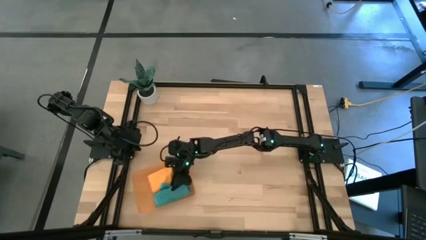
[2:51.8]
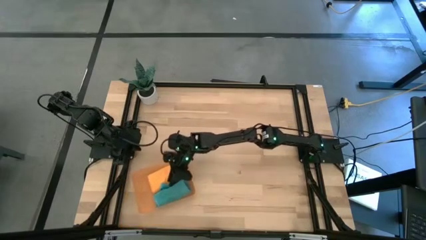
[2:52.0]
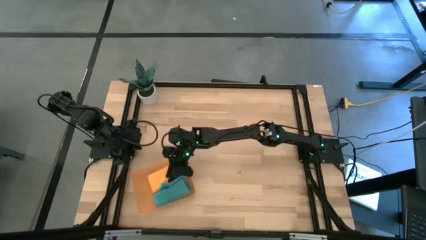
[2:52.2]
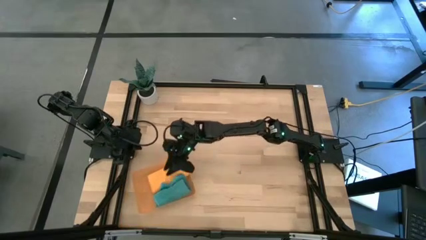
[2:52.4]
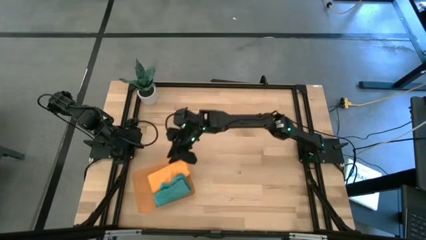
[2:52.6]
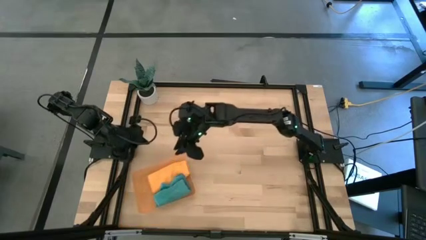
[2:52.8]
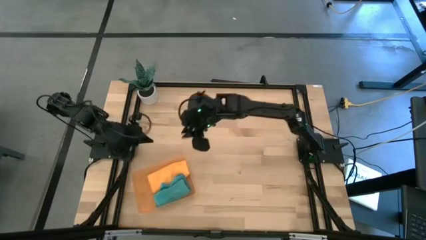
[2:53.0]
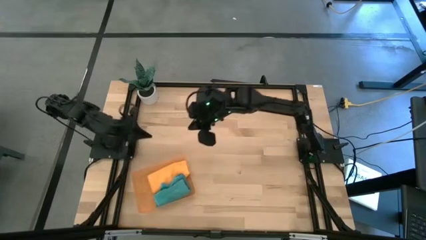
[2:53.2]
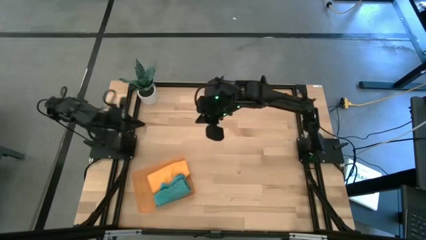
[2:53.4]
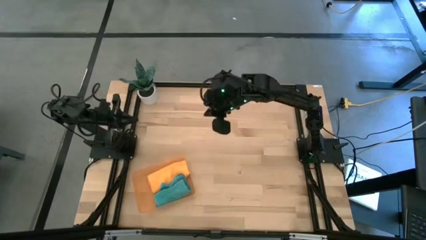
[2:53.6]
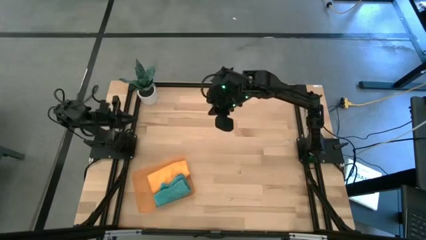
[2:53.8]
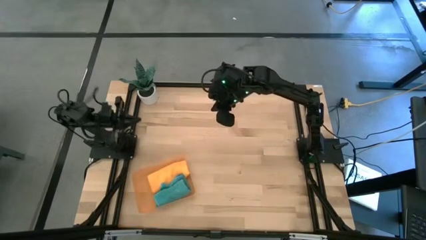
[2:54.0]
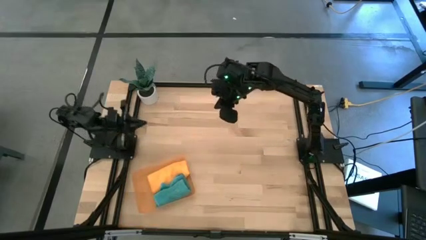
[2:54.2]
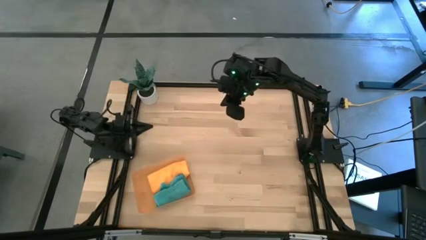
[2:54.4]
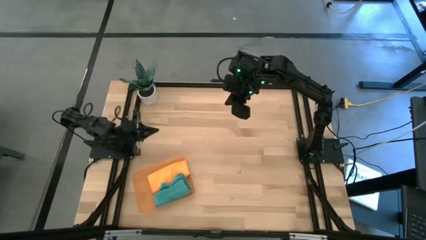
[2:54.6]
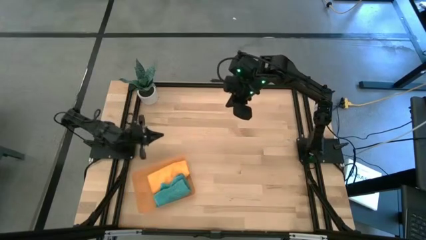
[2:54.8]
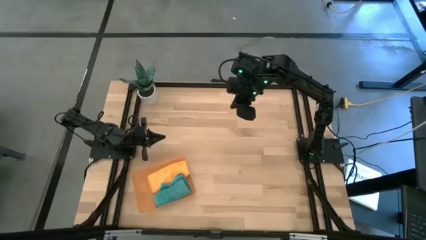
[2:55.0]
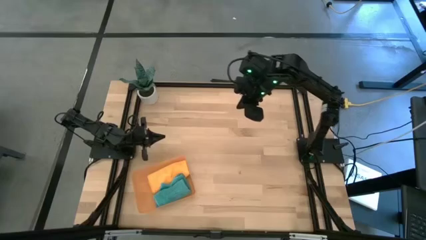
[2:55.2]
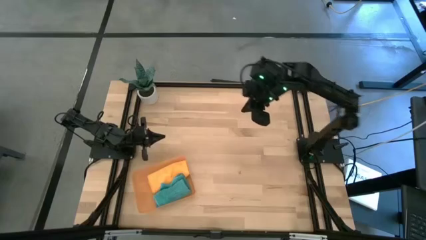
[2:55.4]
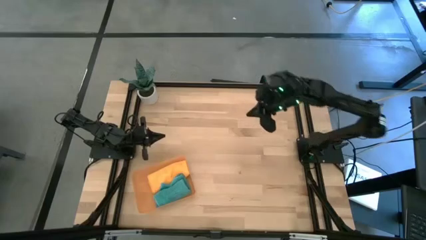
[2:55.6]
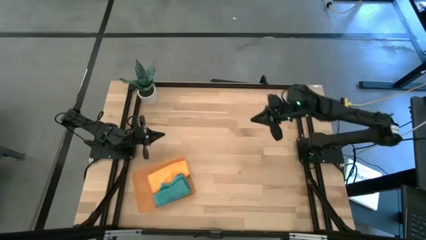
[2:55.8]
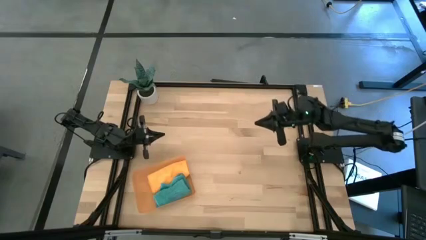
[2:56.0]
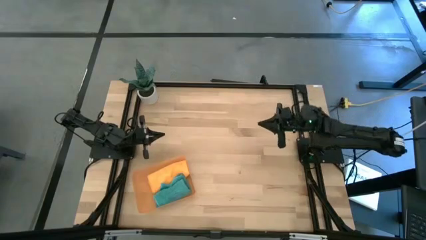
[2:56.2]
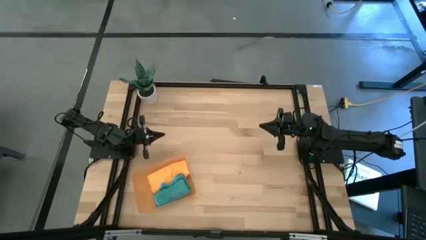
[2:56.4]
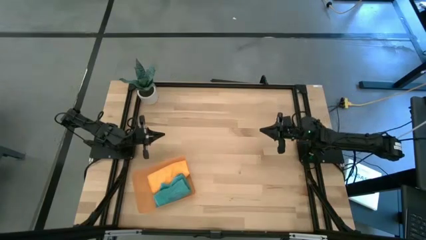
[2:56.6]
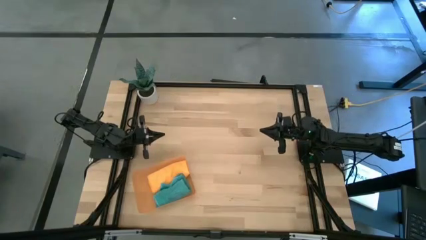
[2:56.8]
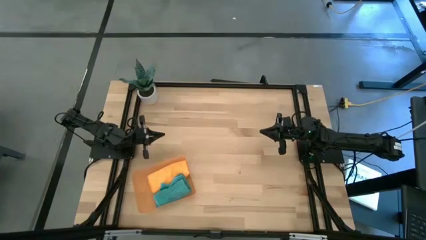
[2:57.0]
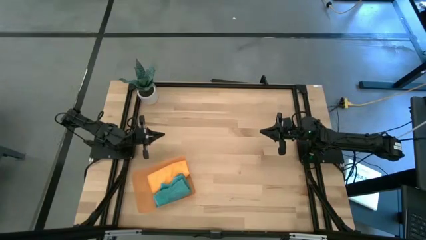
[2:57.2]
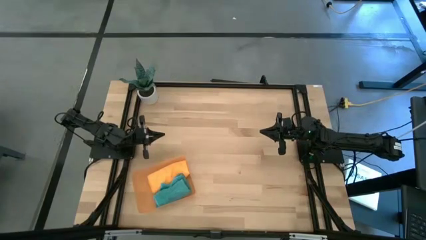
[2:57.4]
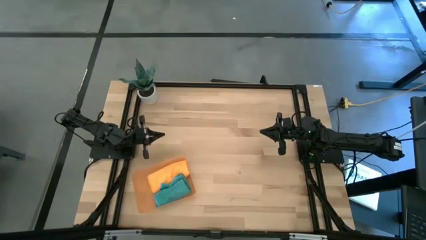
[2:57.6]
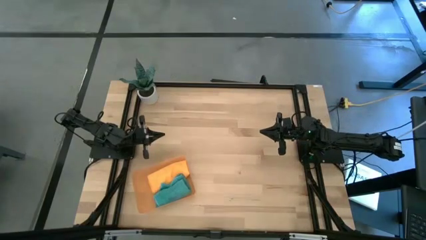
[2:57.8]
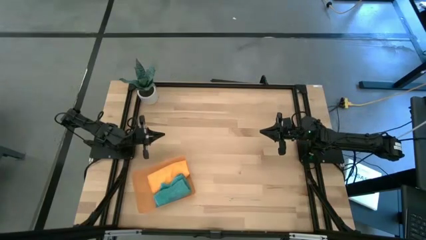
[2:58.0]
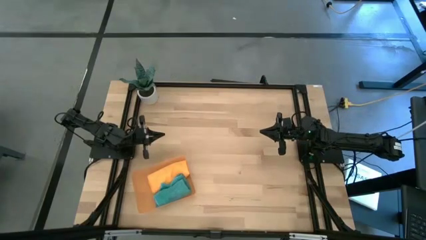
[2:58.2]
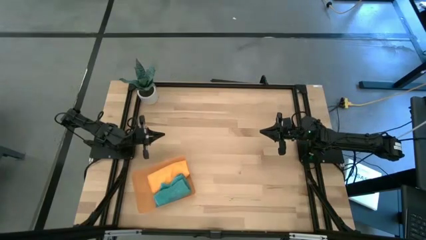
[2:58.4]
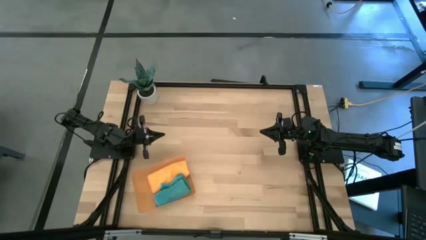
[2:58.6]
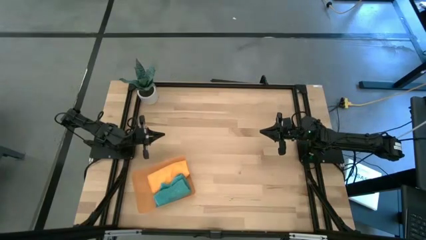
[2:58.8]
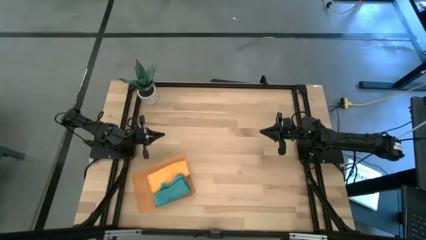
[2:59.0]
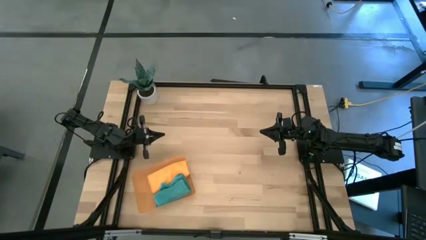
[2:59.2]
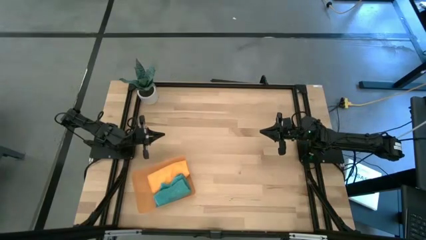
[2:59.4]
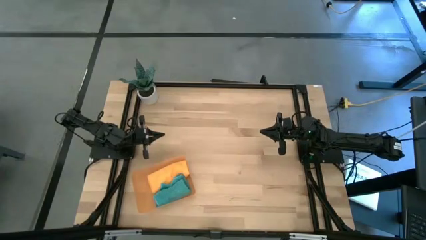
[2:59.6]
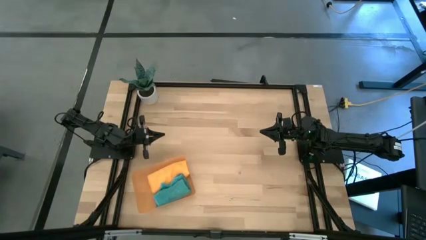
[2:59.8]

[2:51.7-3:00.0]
Task: Roll microfiber towels into tight, uniform cylinder then place into a basket
Return to Home Position

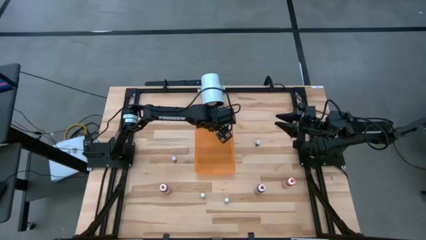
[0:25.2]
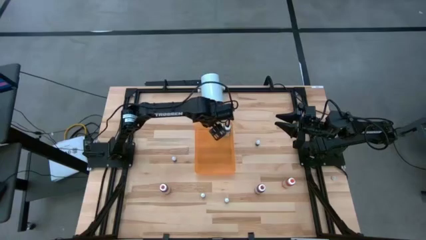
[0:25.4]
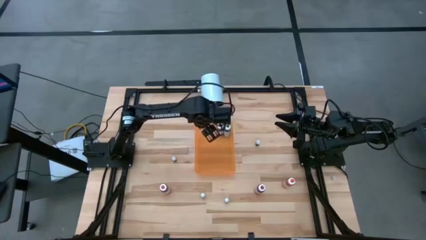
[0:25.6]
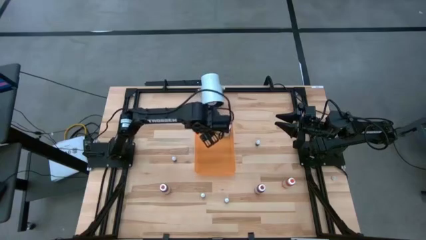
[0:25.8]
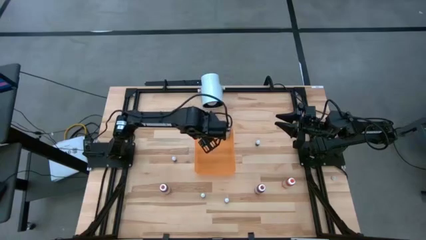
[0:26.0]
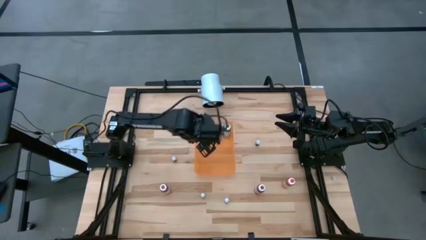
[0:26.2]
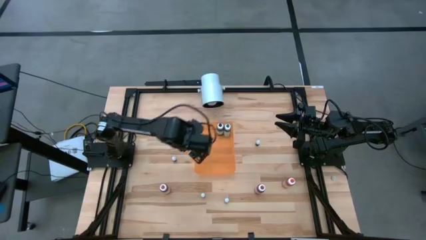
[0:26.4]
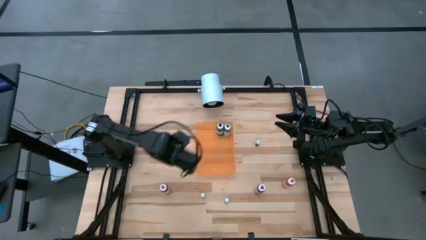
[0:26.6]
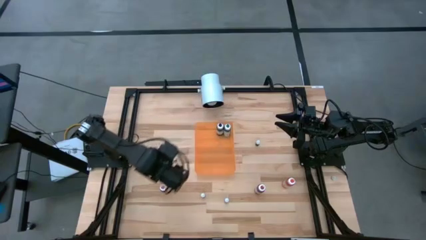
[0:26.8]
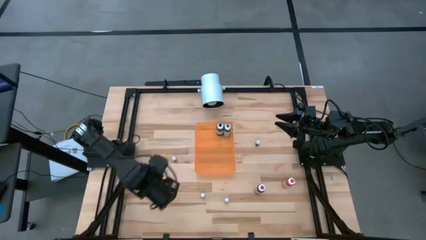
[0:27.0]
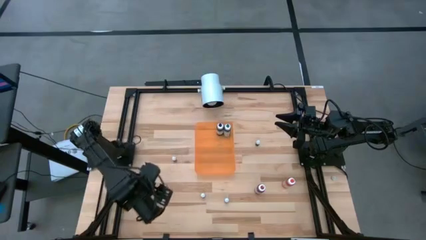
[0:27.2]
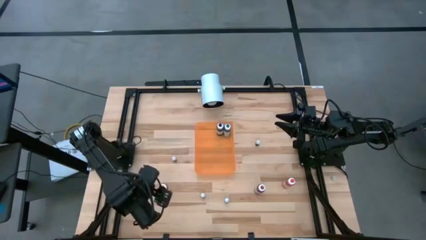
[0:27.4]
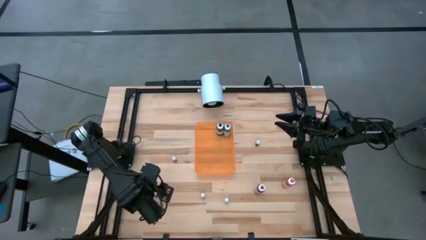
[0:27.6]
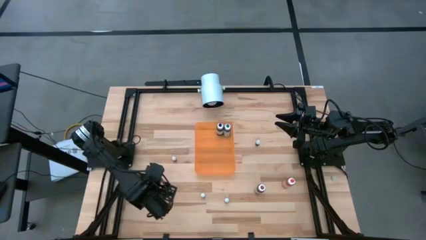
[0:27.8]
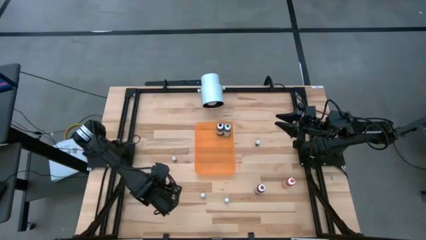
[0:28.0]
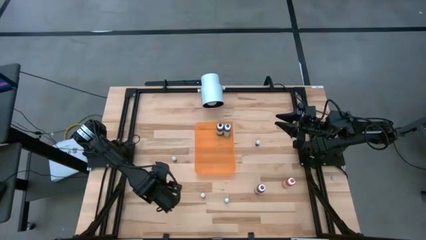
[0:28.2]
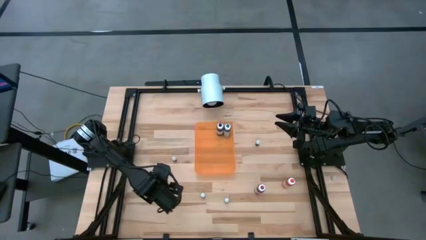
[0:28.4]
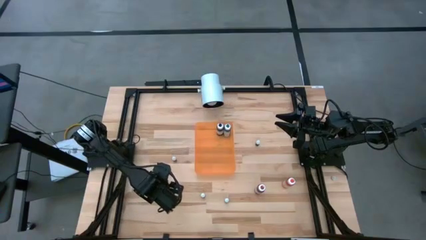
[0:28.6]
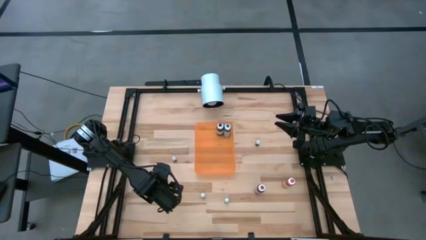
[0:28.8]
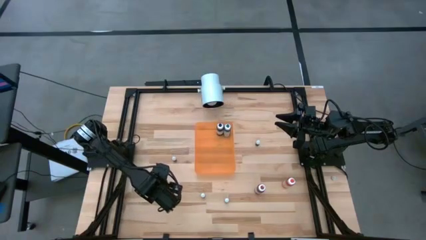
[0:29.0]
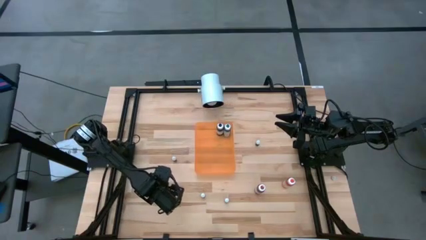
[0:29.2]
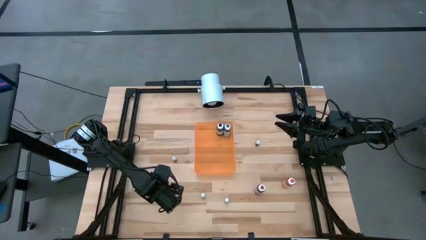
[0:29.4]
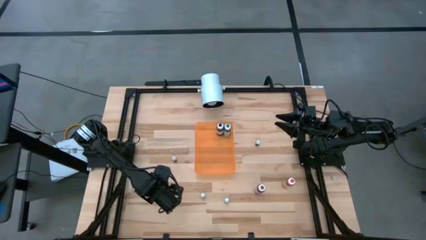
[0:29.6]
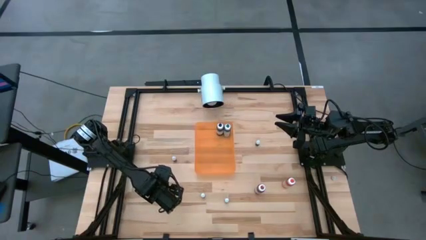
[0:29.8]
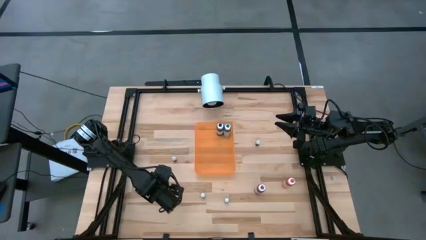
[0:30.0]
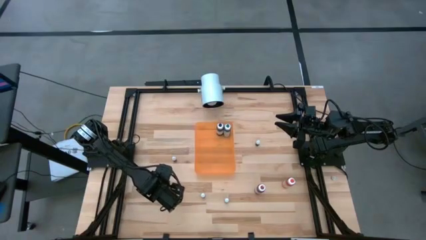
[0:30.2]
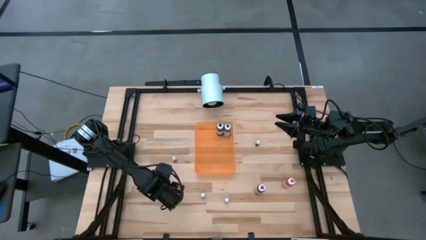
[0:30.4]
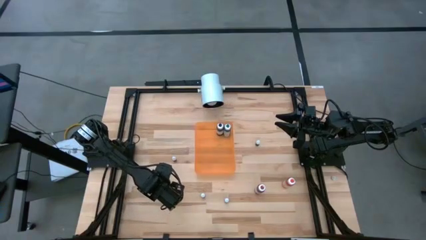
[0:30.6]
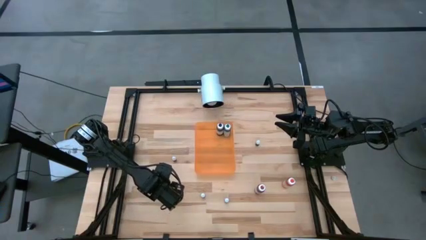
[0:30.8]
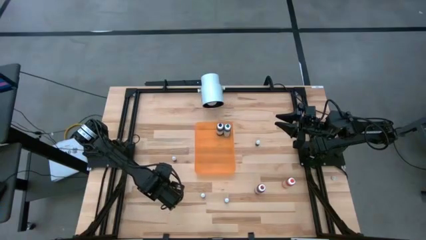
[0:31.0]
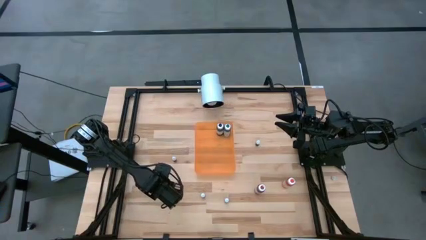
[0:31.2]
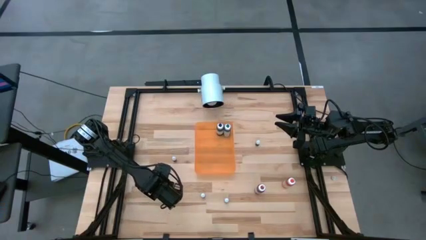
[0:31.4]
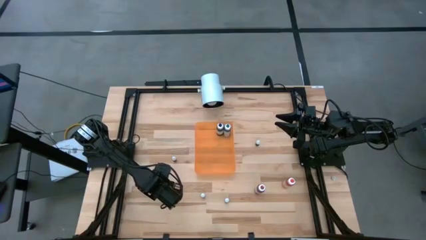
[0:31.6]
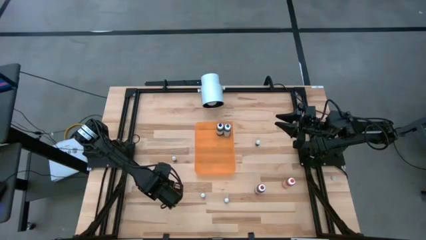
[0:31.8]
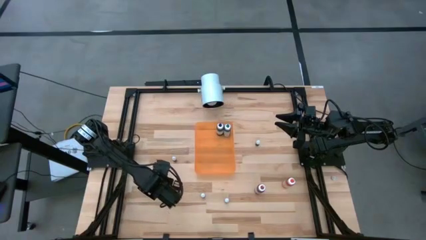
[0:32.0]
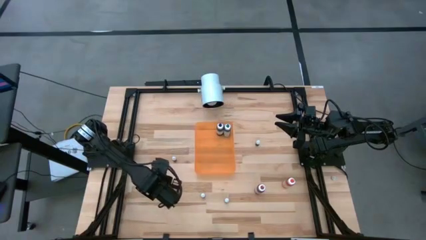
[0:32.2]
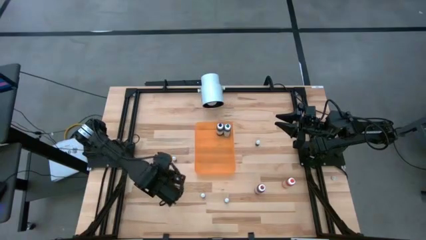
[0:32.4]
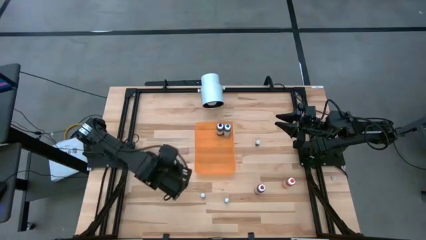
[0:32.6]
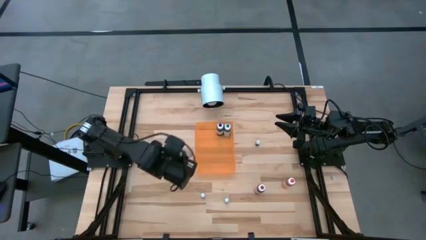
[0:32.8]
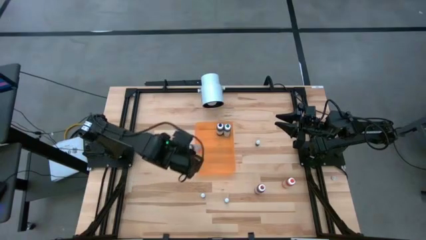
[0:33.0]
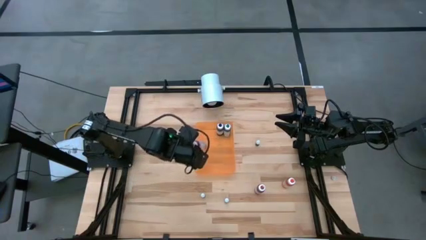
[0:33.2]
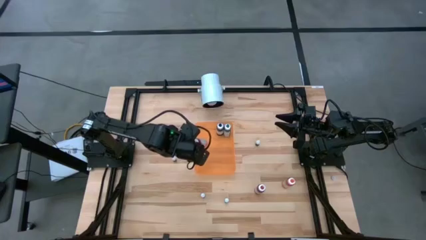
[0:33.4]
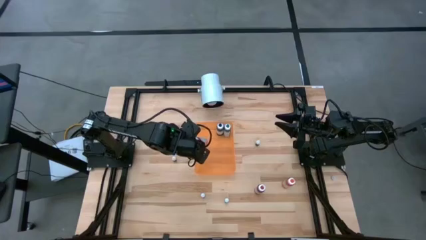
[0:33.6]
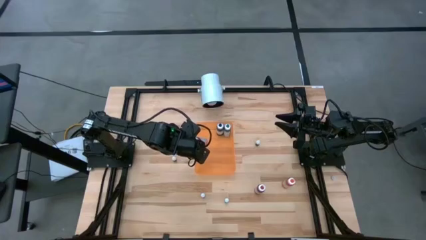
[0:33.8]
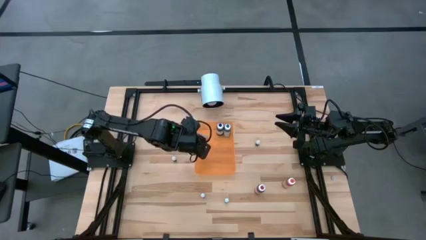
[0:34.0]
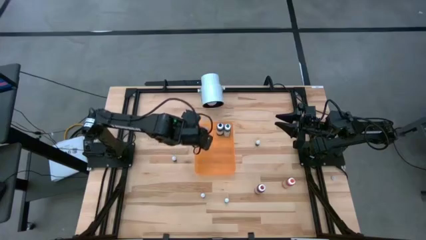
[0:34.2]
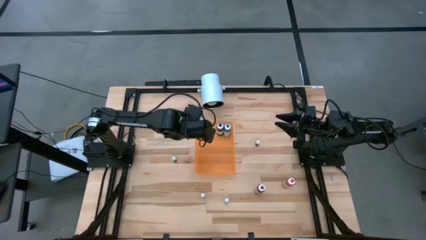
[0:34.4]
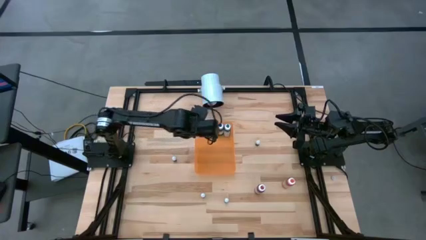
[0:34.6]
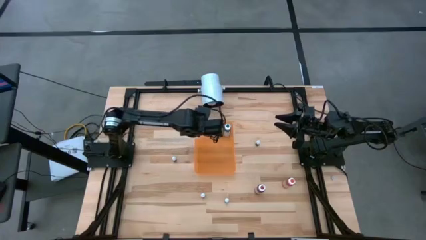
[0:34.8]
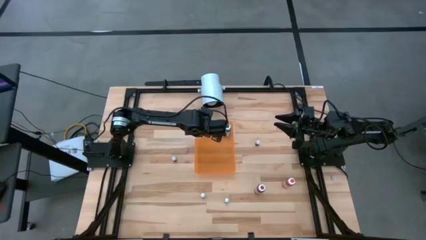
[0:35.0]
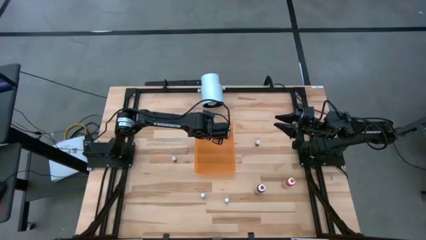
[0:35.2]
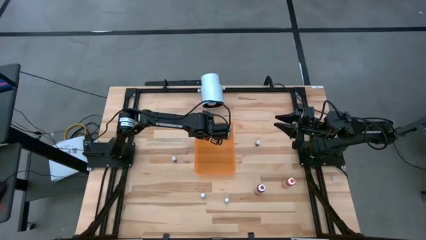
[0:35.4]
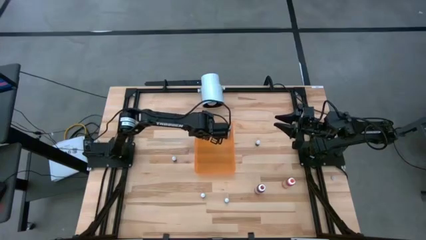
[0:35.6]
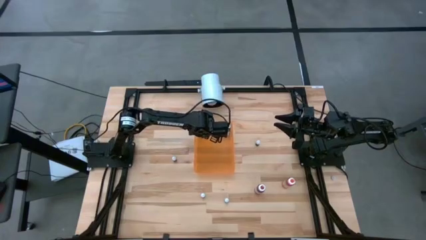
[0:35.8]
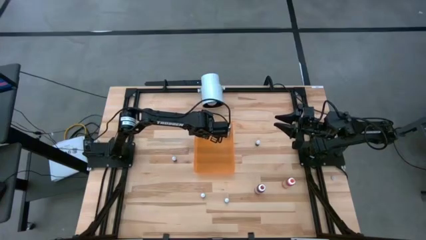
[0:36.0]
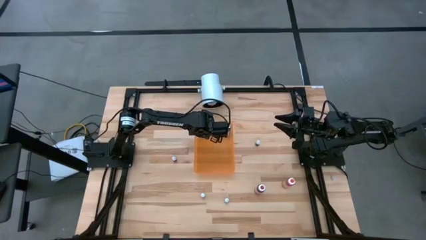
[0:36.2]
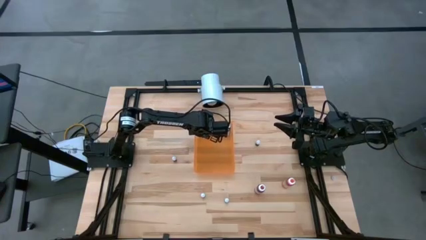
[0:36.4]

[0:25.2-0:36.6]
Task: Pick & Place food coloring
Put the large pink food coloring bottle into the bin
